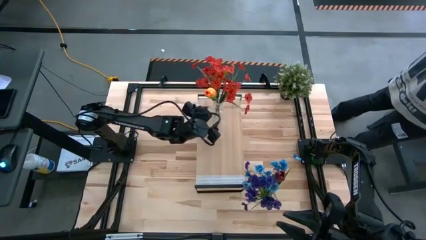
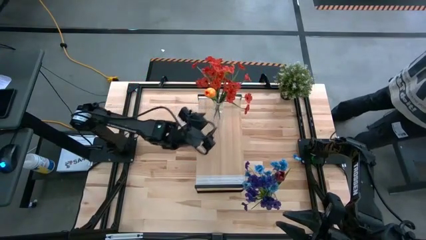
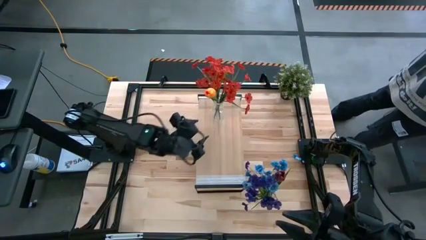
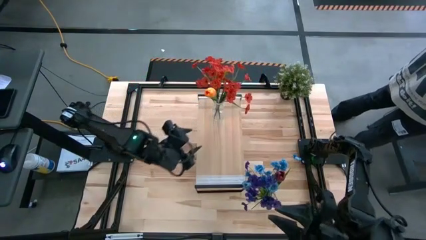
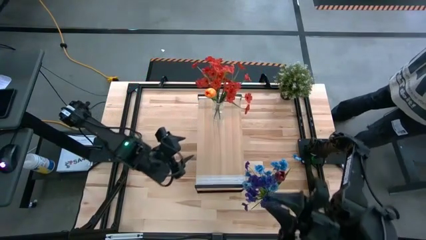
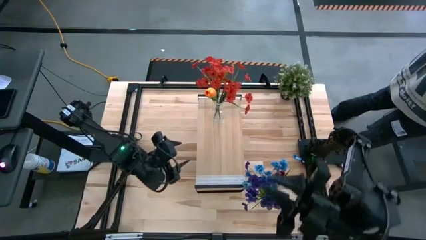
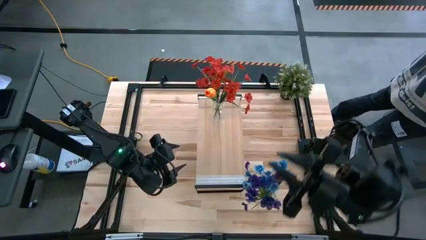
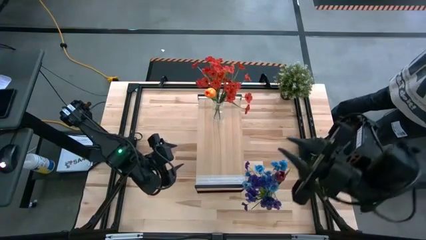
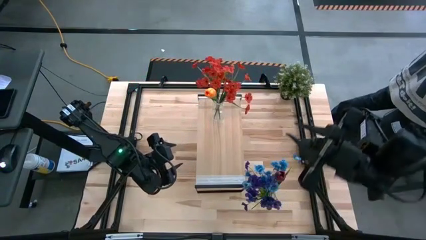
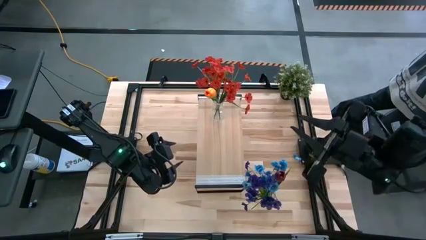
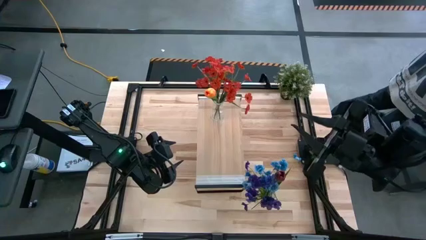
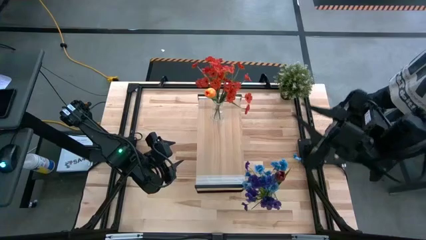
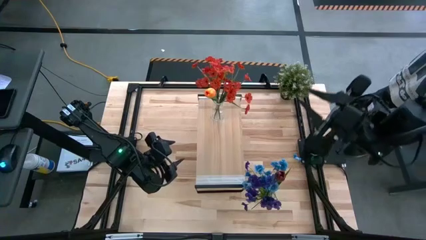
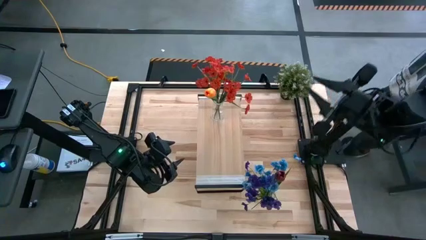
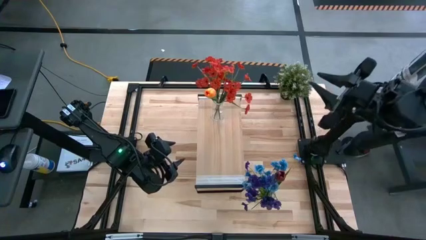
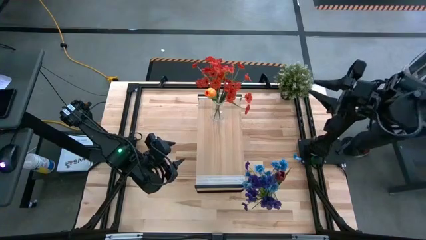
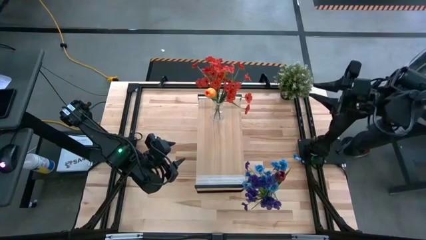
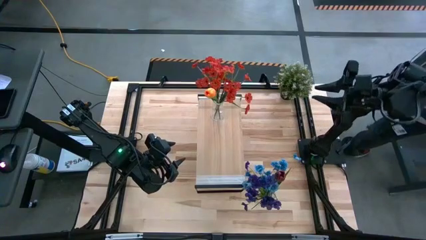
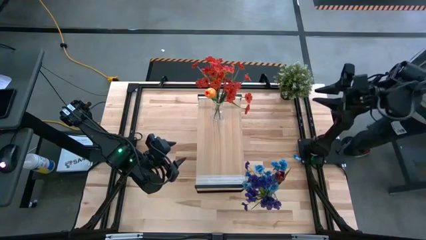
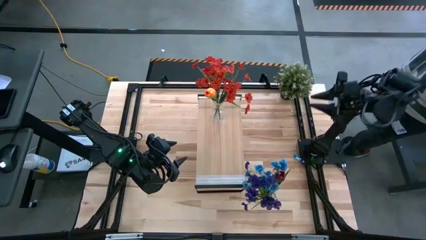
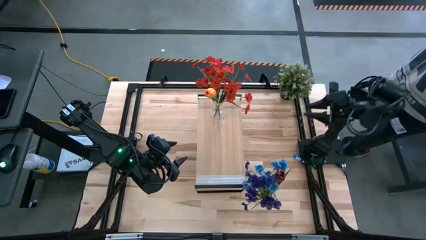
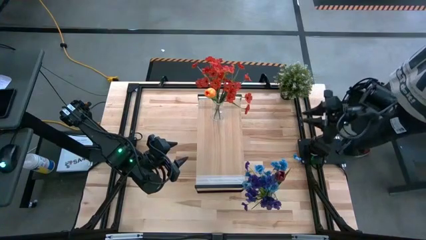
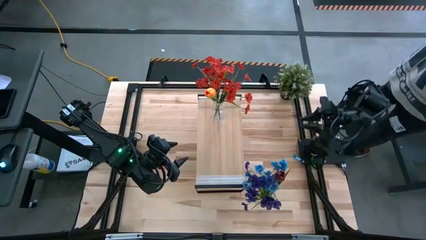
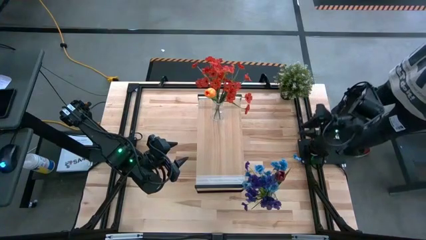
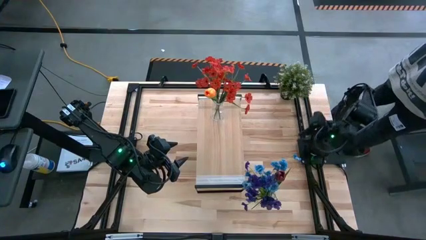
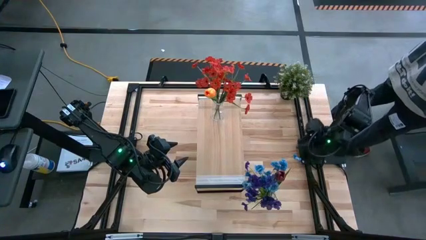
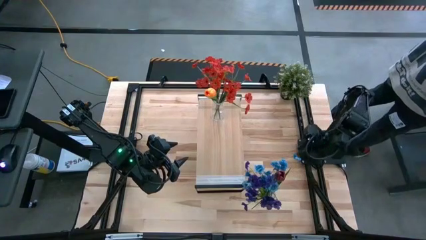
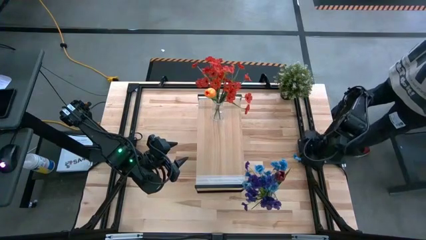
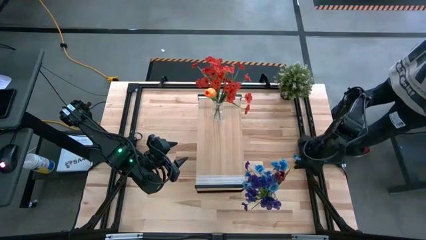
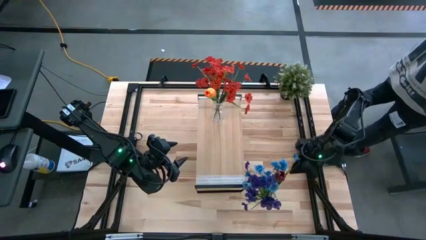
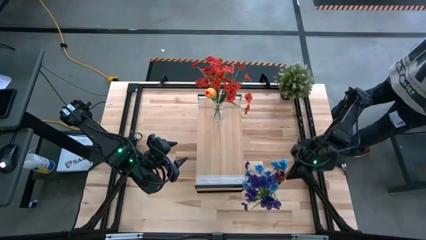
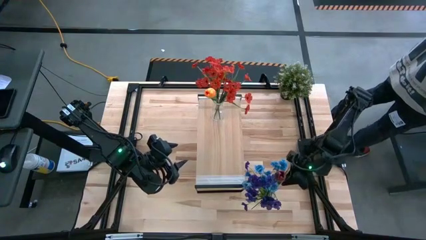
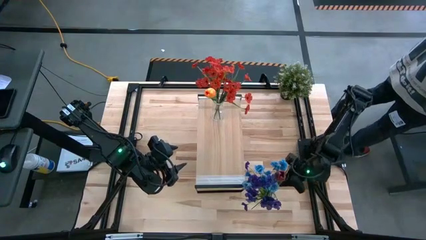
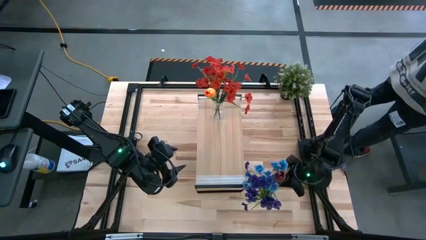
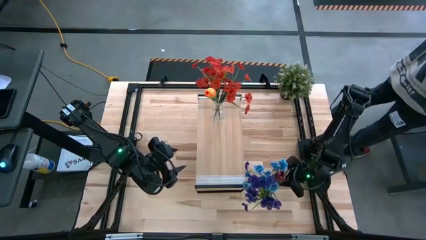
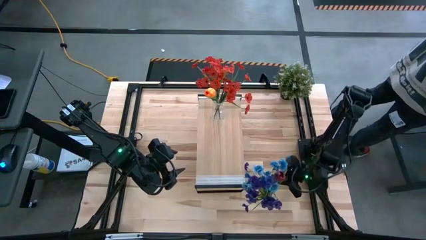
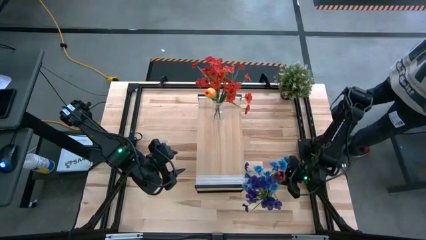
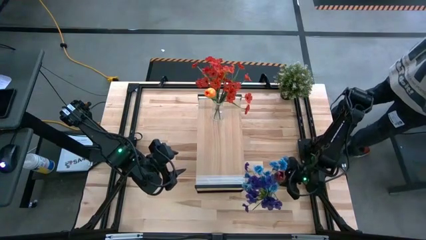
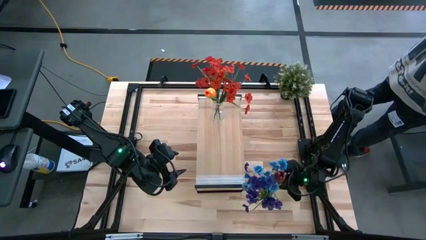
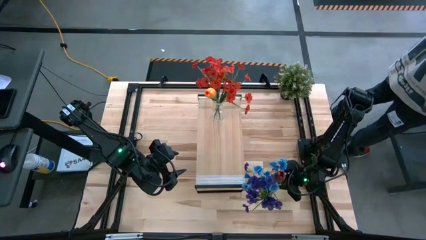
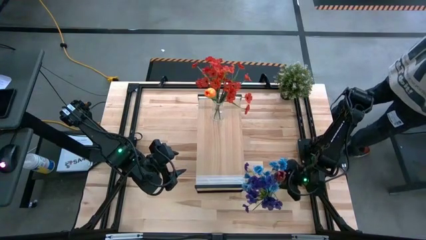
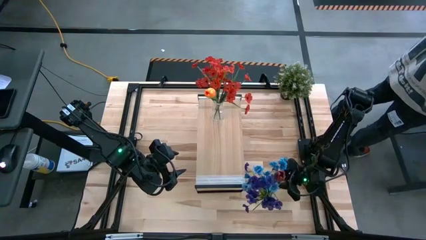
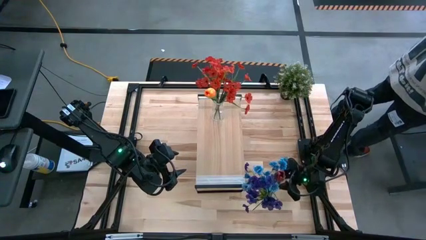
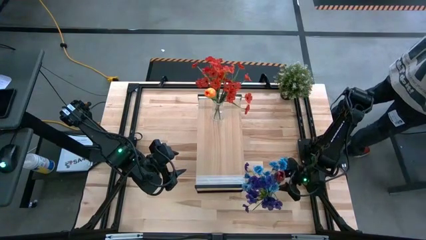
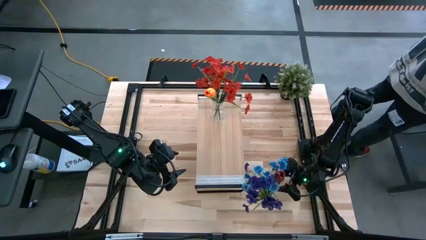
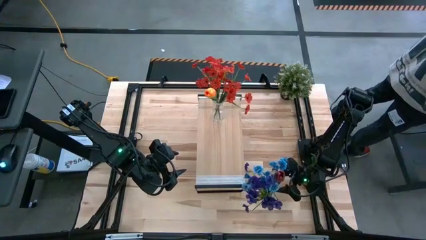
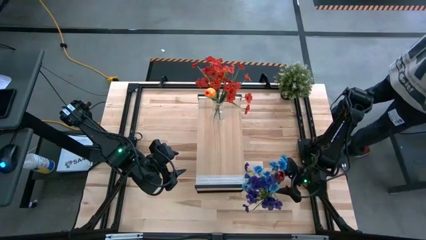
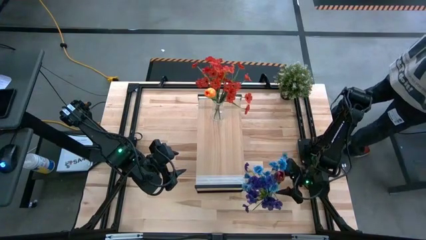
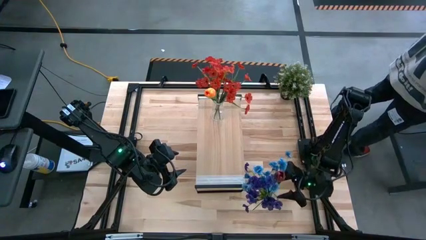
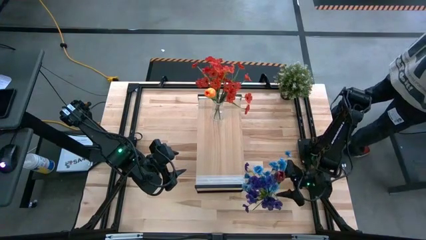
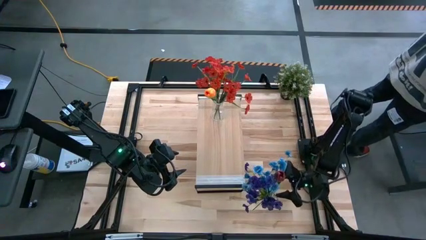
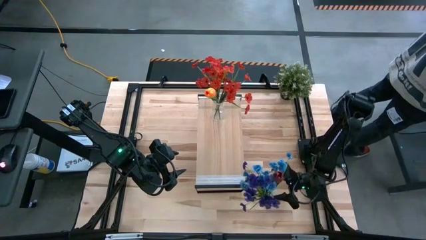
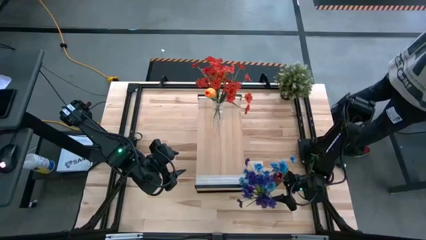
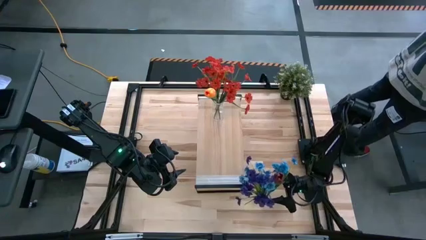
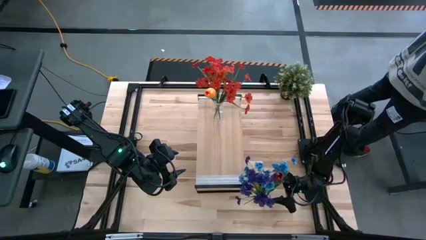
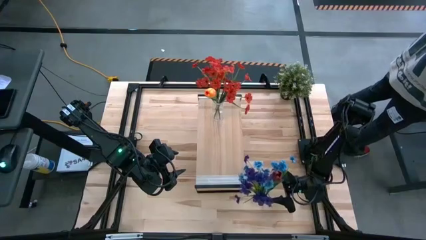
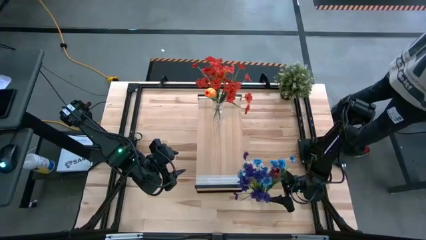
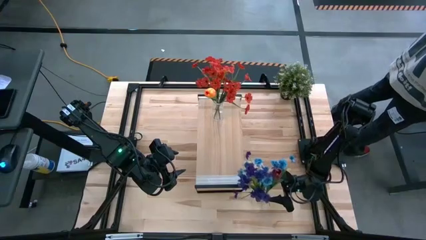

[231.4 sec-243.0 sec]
Task: Pick and place flowers into a vace then onto a shelf
Put the transparent vase with flowers on the shelf

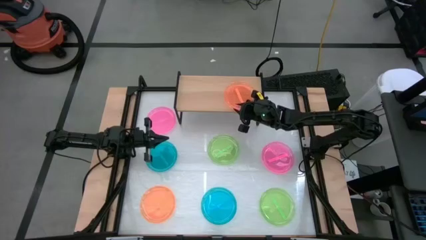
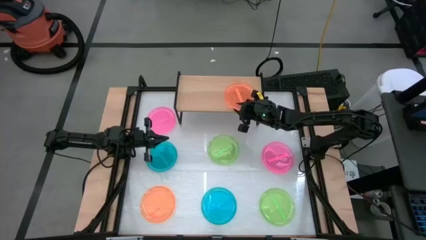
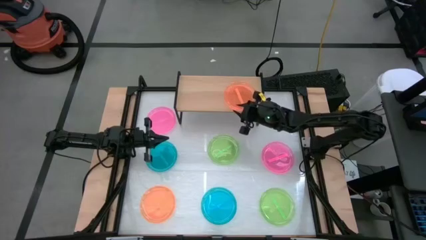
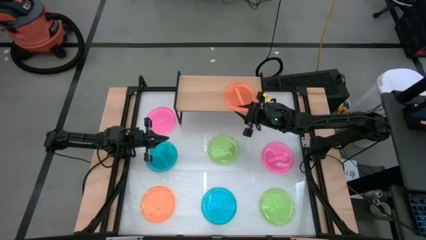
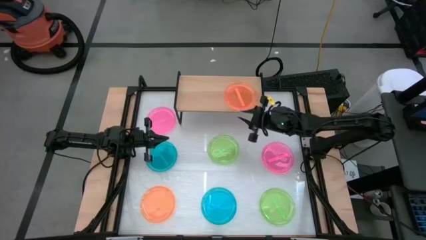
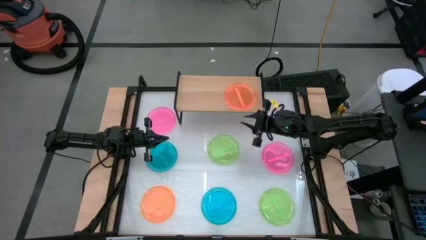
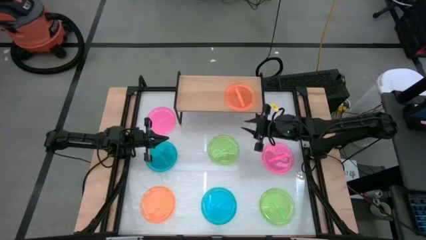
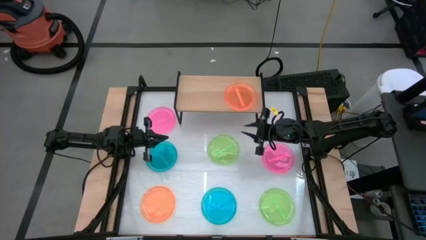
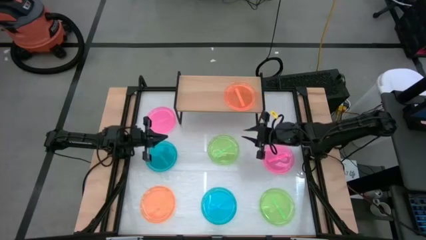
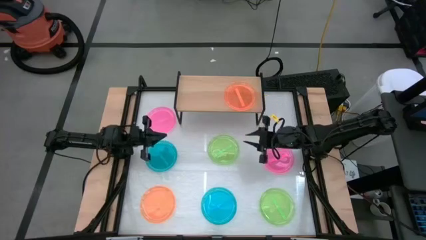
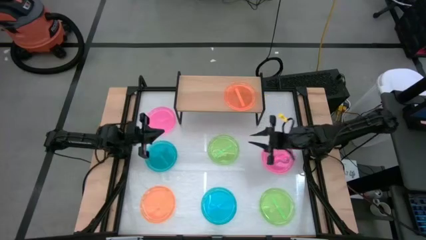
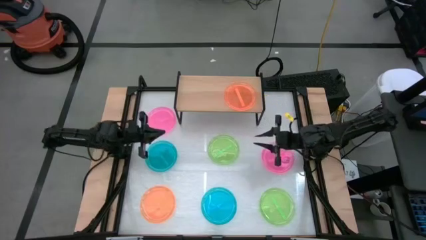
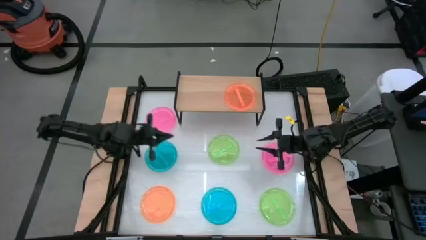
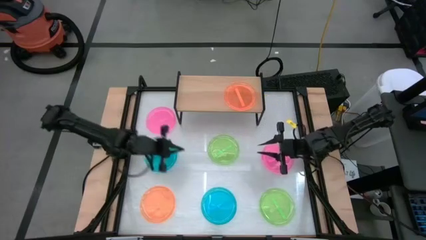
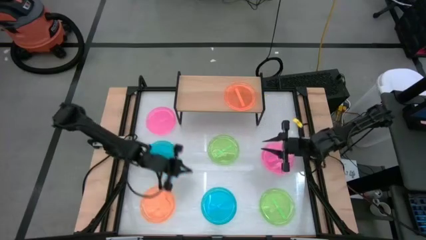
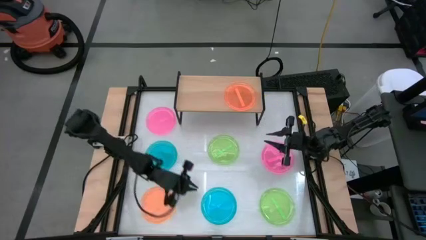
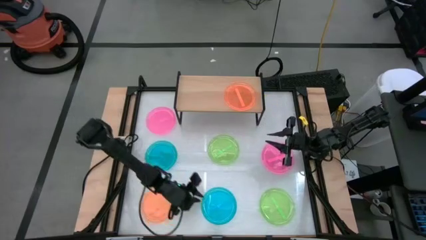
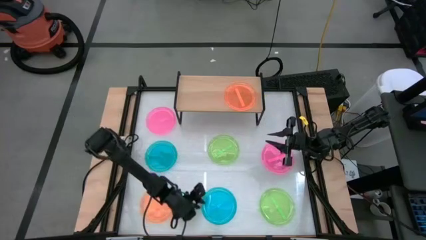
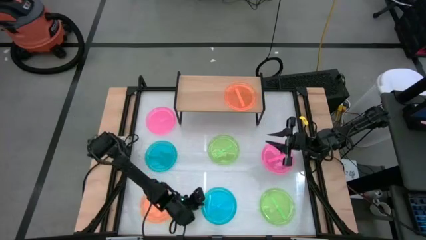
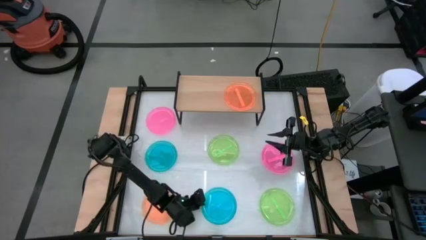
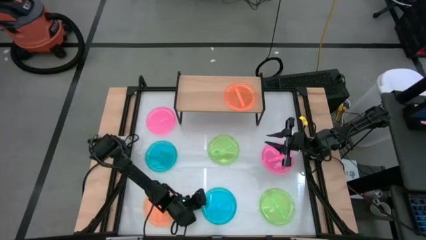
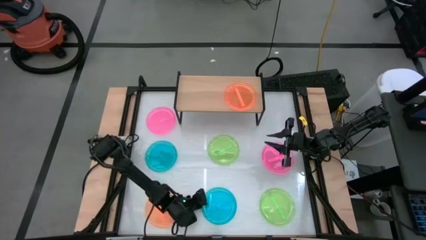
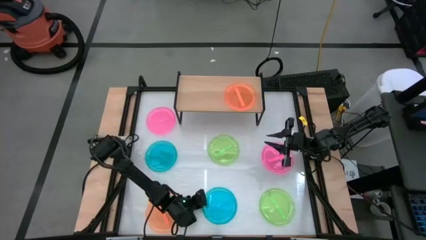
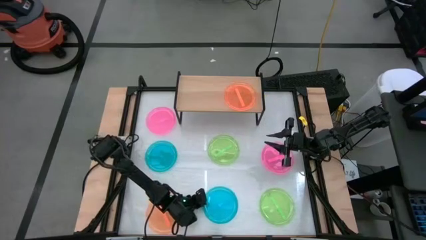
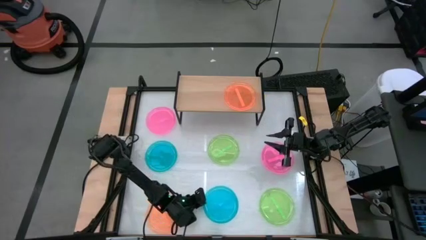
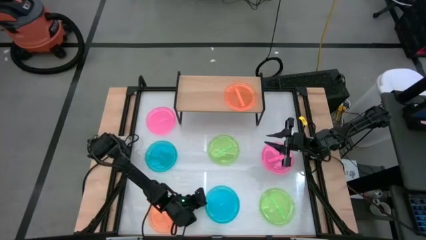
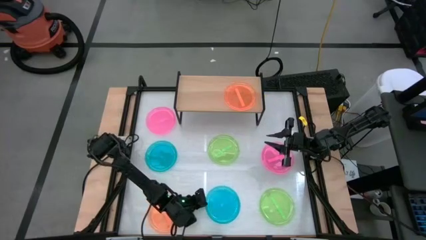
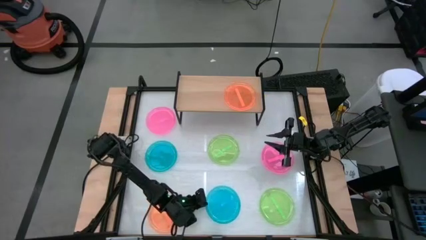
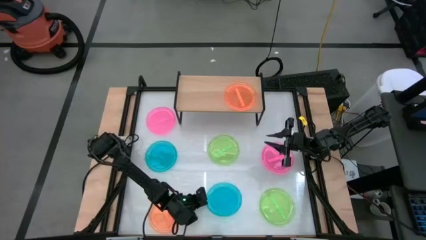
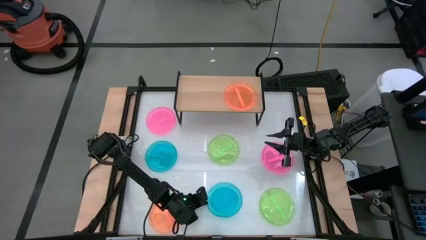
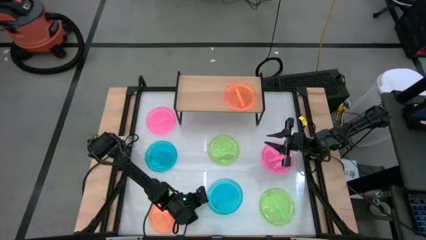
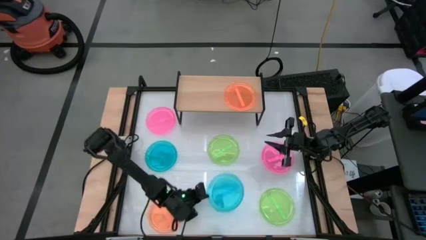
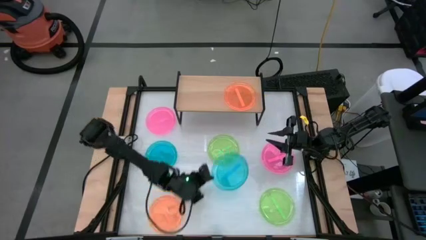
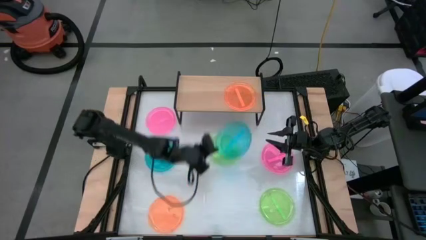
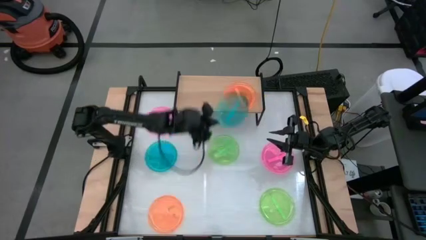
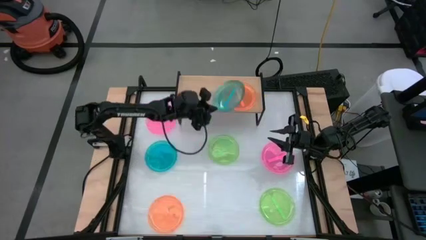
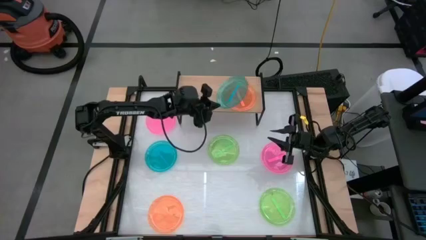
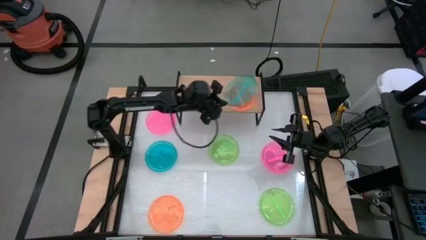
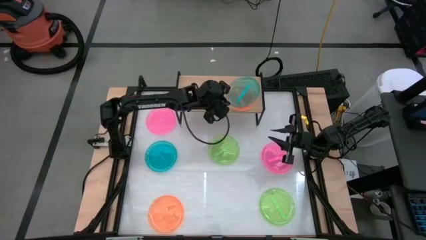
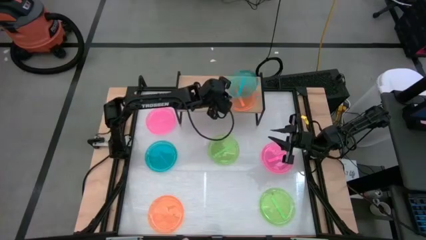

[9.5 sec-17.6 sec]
Task: Place and stack plates onto a shelf
Stack the bottom blue plate on top of the orange plate on the shelf
